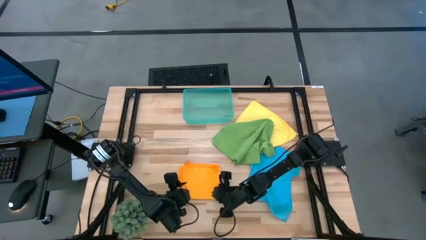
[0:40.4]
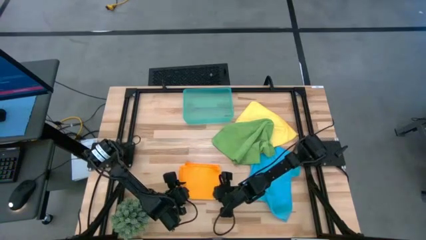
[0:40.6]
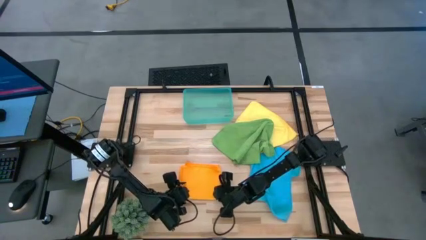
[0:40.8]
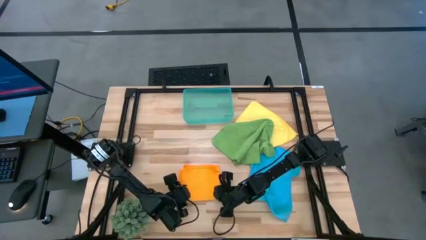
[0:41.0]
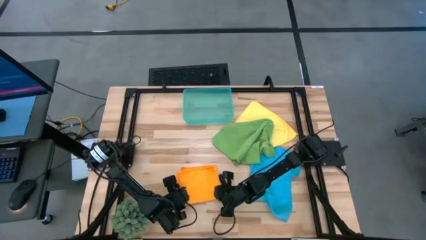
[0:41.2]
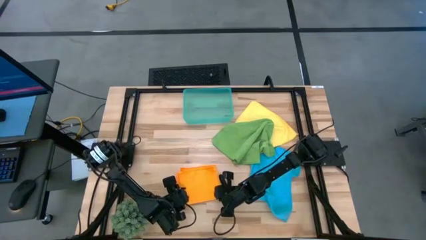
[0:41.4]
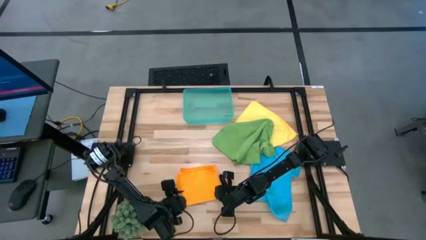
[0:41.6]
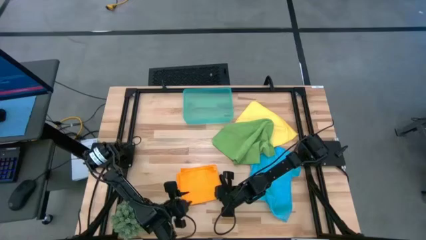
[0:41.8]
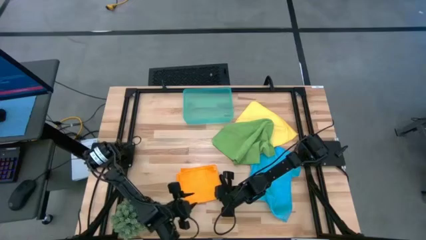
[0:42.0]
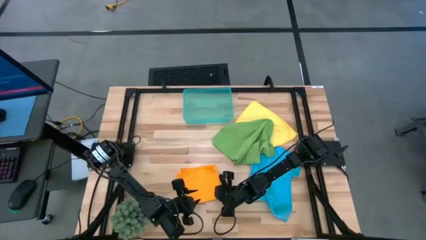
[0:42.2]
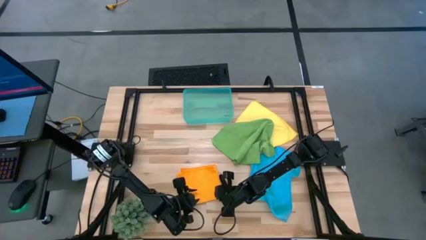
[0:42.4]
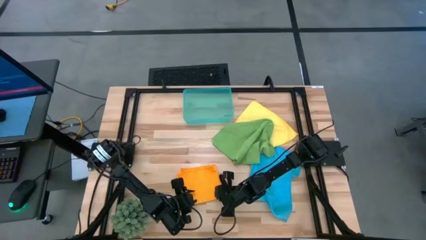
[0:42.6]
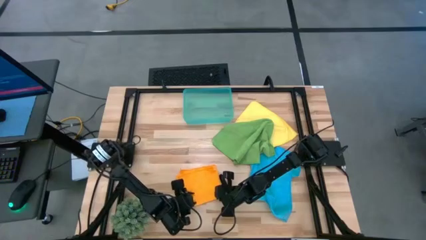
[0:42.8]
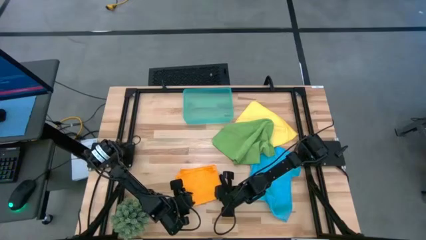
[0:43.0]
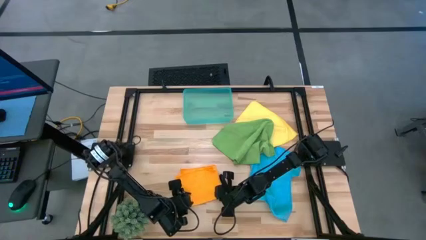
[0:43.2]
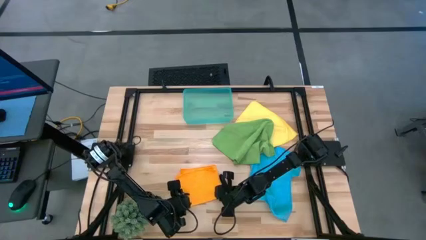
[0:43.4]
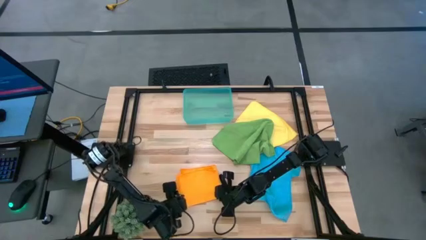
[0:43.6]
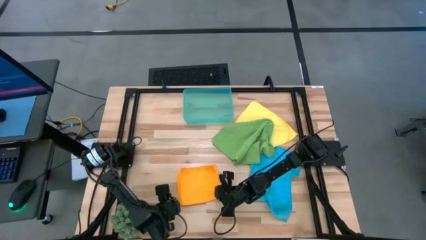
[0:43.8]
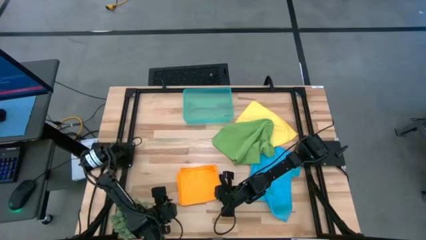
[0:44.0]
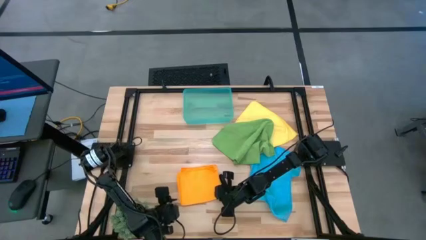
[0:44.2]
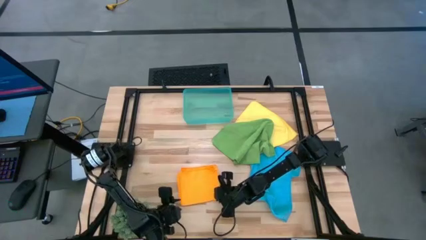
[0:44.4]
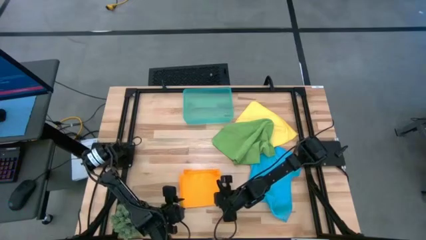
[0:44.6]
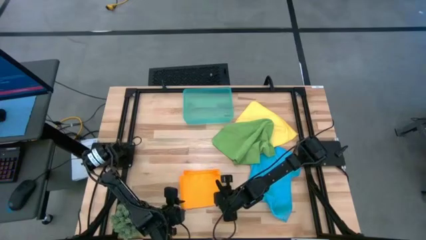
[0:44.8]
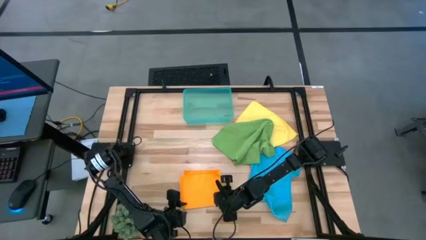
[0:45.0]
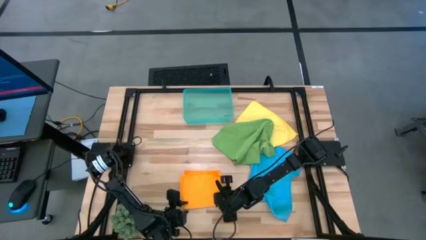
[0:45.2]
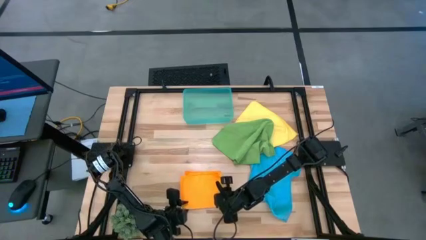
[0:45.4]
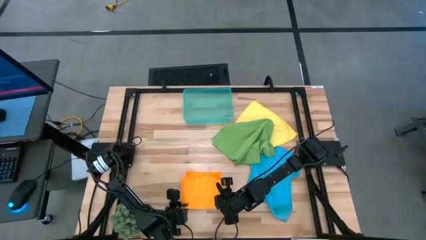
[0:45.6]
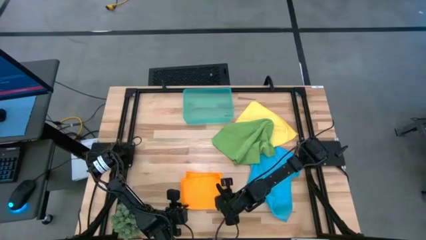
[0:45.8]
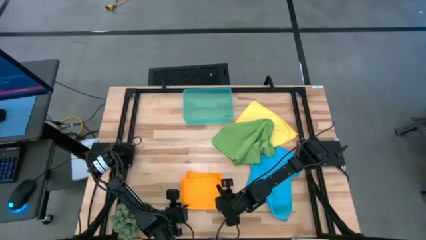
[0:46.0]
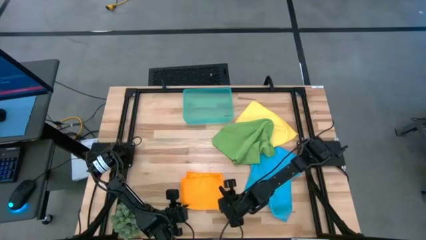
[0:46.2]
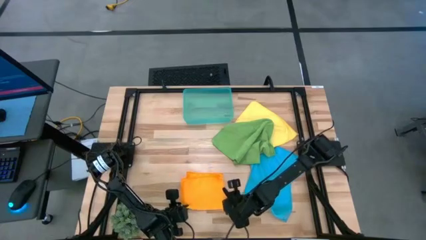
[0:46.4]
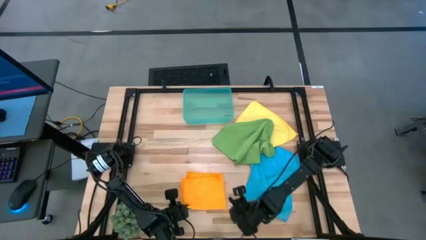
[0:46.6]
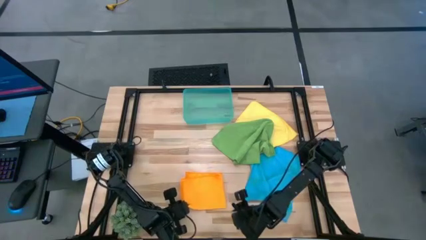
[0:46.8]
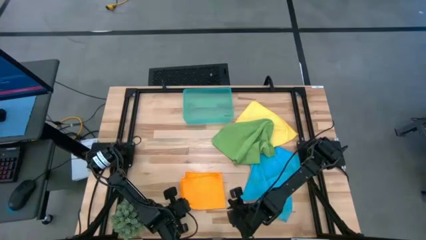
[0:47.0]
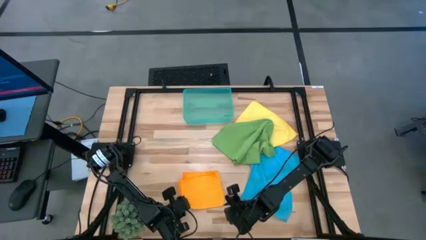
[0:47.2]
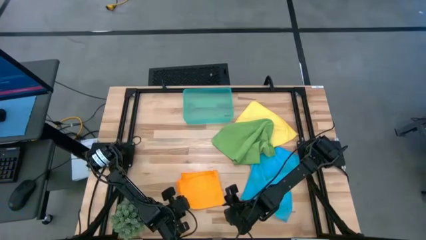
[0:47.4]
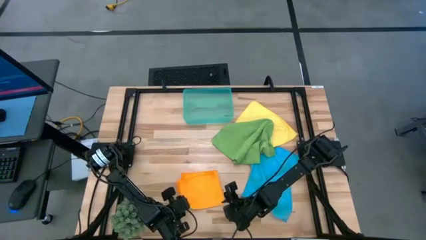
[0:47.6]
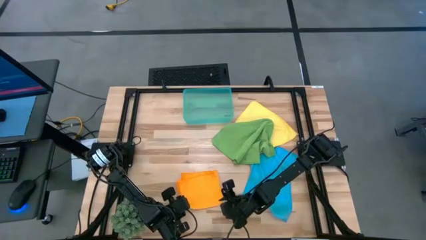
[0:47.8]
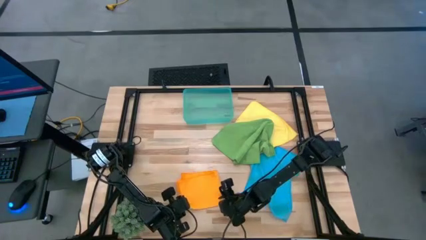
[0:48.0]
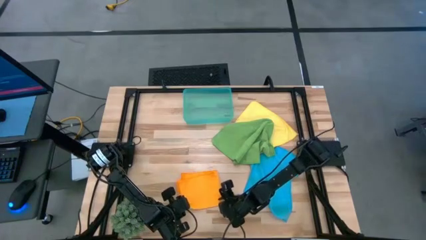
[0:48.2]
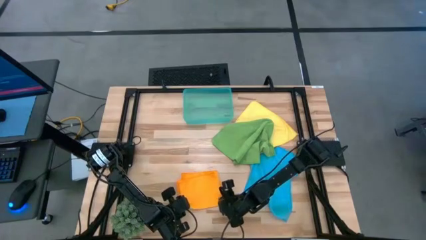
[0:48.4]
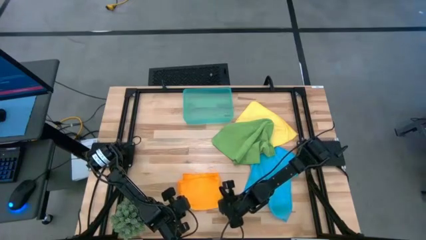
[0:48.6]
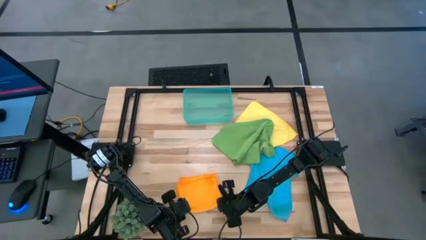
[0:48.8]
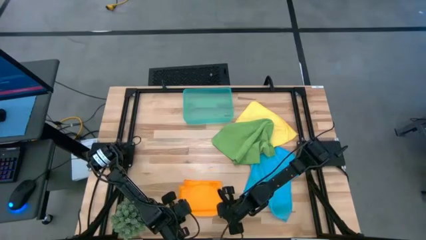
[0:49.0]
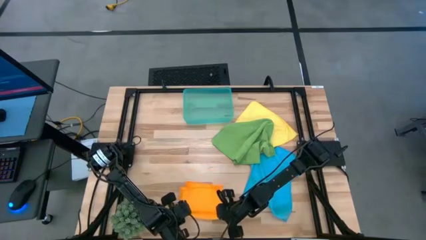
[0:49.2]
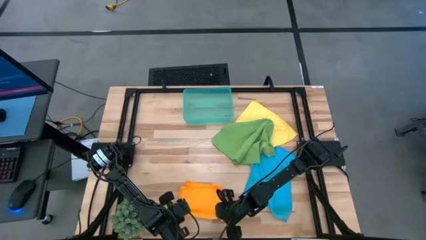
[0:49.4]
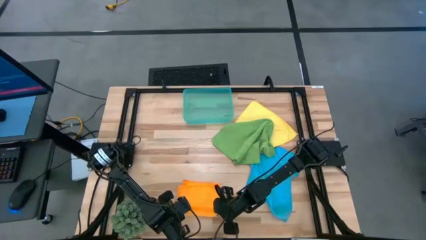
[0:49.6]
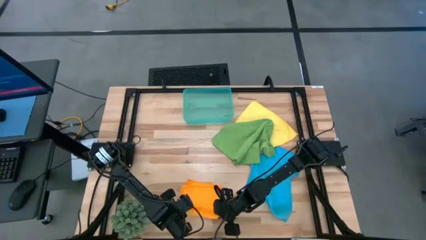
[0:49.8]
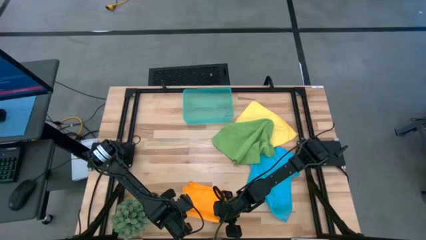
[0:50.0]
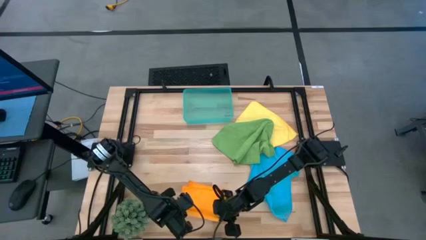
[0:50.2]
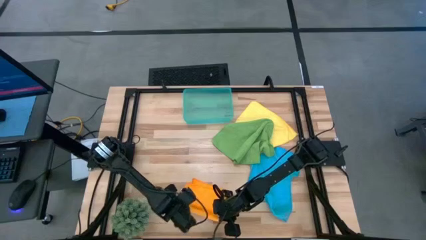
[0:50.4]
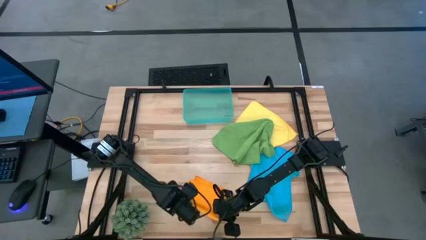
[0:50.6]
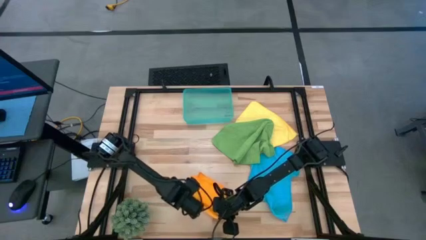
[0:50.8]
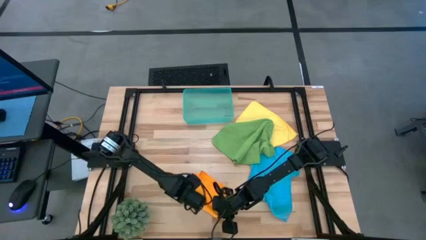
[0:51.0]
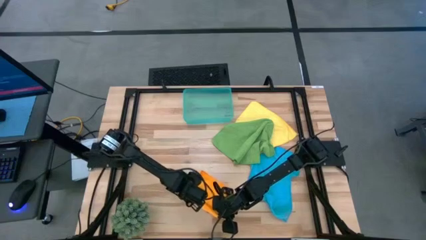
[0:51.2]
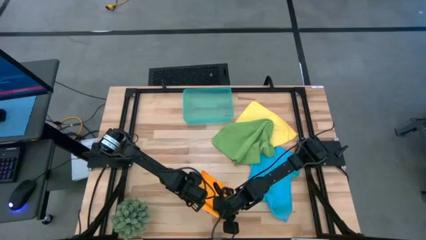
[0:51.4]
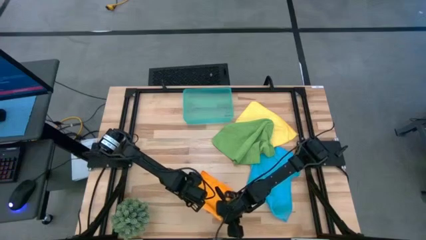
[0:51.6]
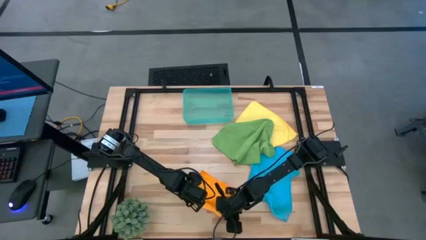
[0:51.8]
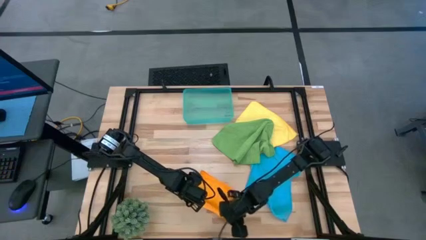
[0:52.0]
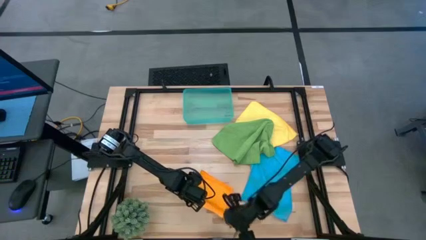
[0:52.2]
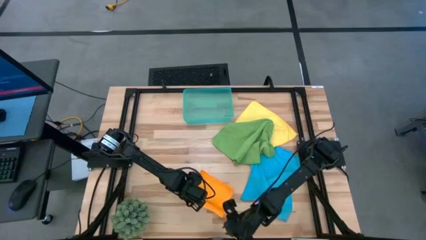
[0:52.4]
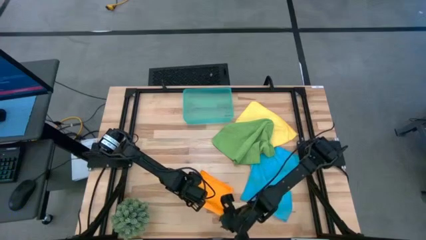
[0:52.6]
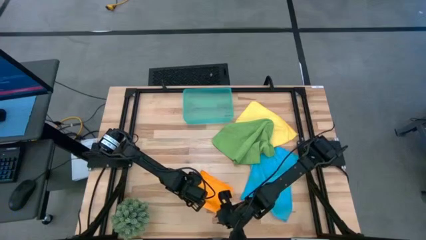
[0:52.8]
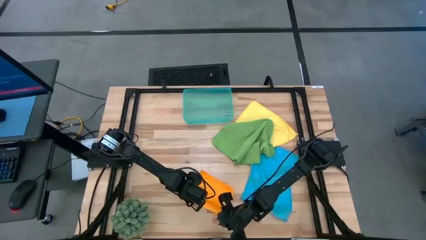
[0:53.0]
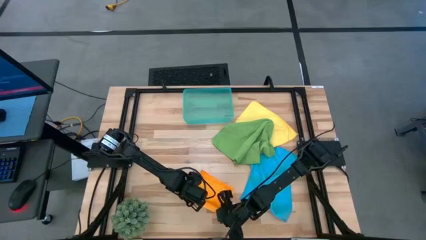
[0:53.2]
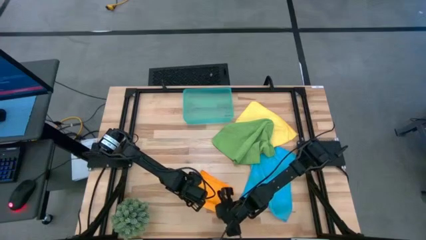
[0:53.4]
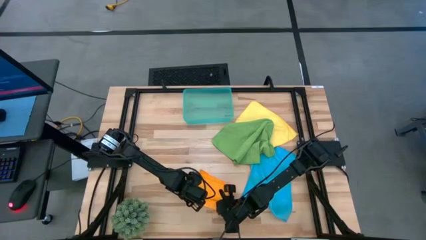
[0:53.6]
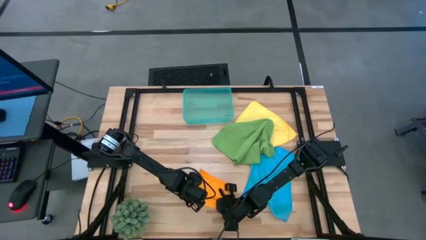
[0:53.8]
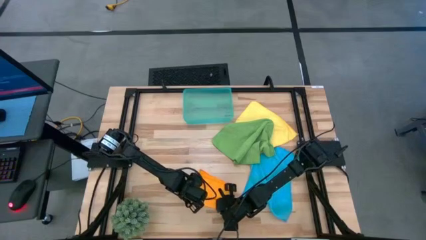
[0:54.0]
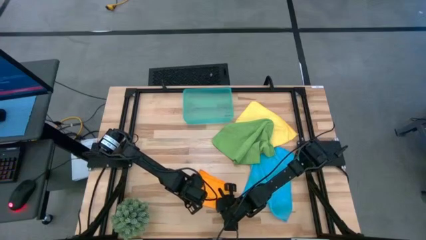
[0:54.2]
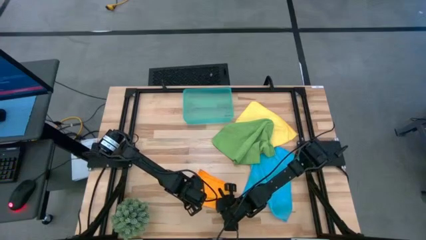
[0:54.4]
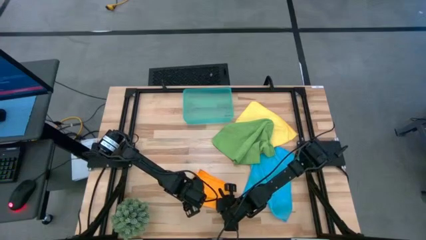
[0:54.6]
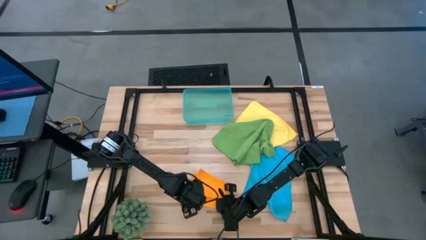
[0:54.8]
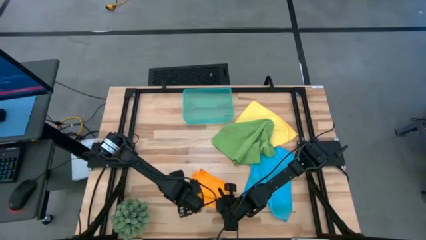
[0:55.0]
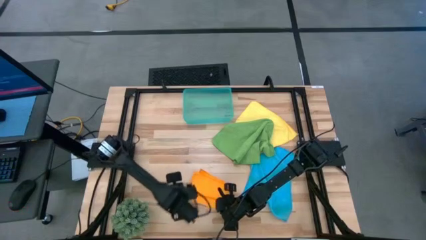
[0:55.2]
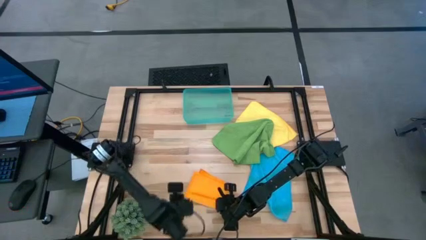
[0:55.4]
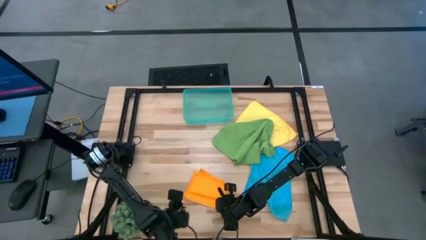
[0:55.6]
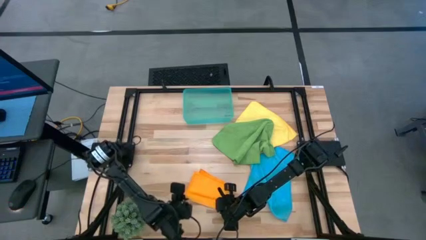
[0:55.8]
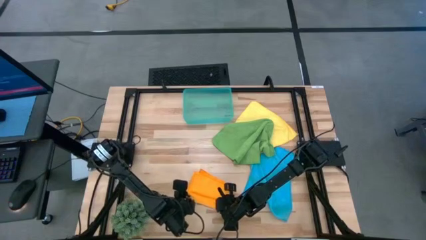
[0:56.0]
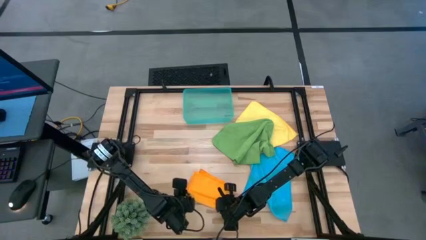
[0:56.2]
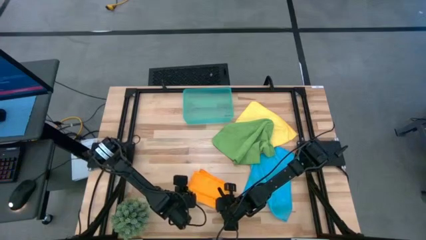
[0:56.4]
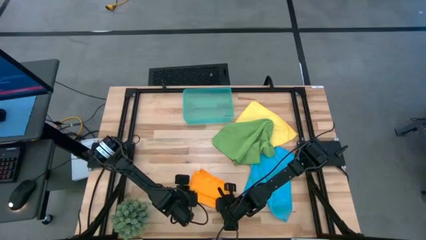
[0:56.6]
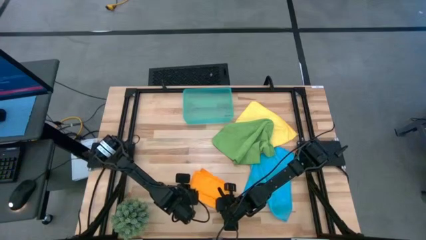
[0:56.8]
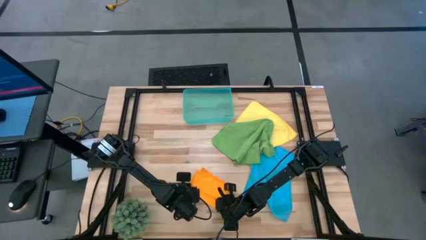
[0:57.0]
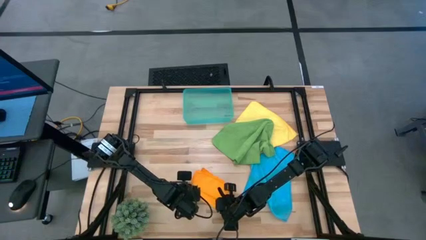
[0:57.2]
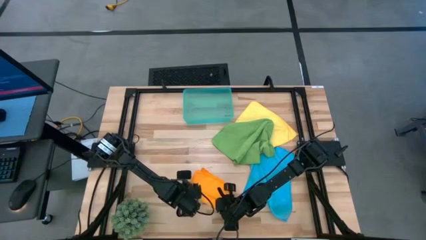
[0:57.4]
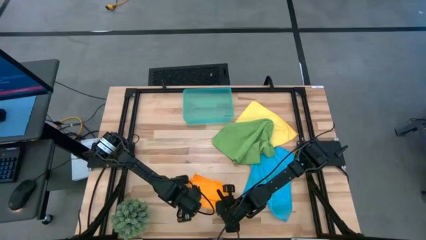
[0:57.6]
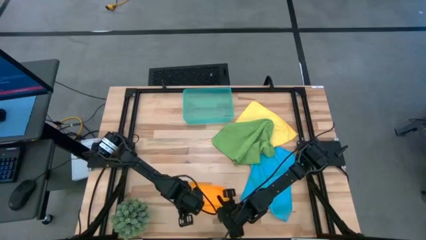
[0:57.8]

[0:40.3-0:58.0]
Task: Roll microfiber towels into tight, uniform cylinder then place into a basket
Fold the orange towel
